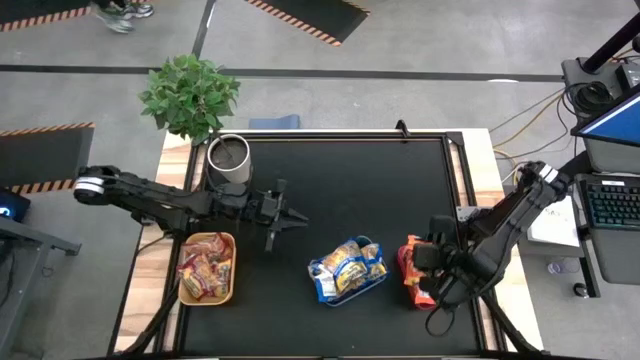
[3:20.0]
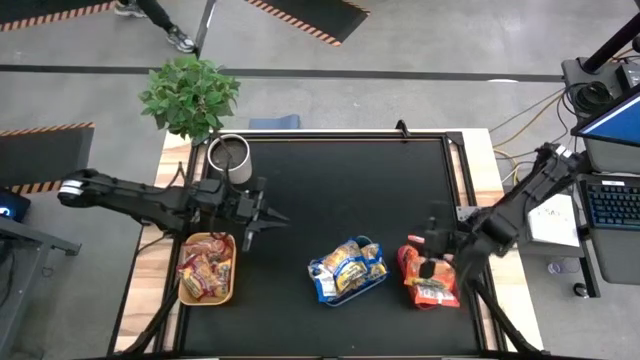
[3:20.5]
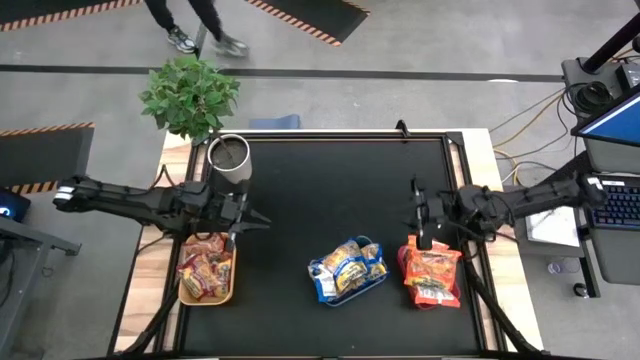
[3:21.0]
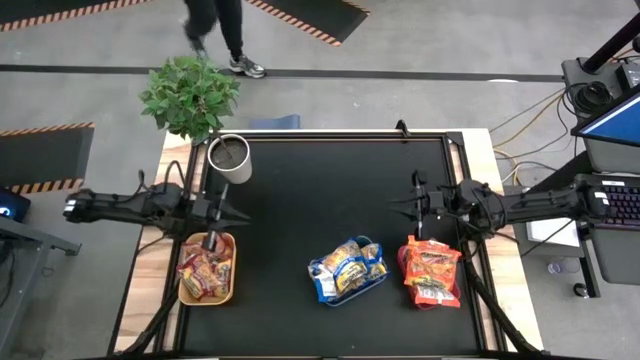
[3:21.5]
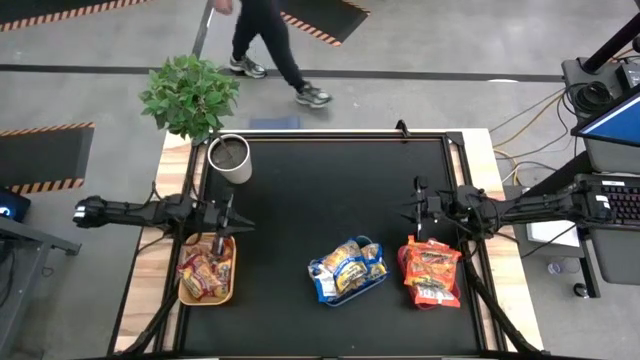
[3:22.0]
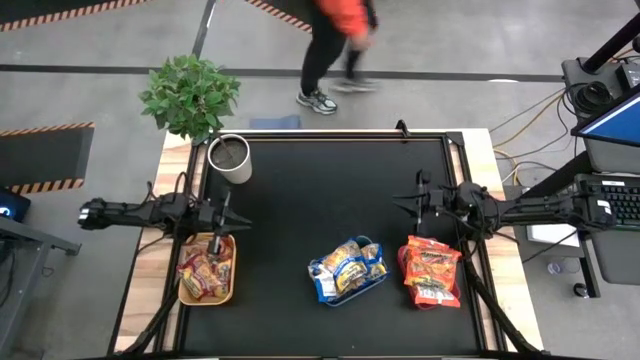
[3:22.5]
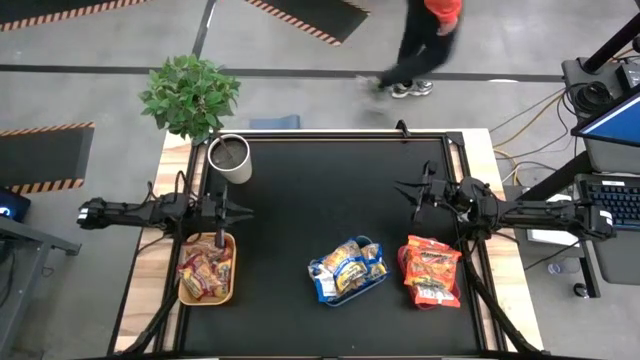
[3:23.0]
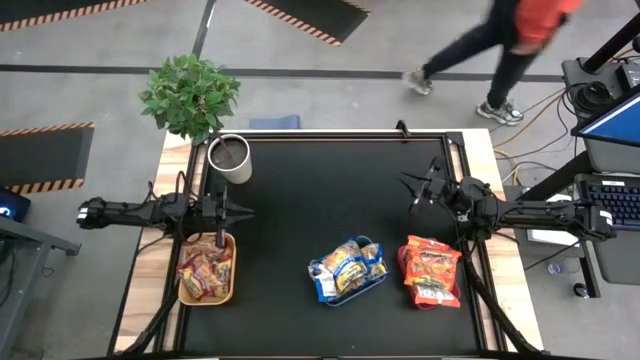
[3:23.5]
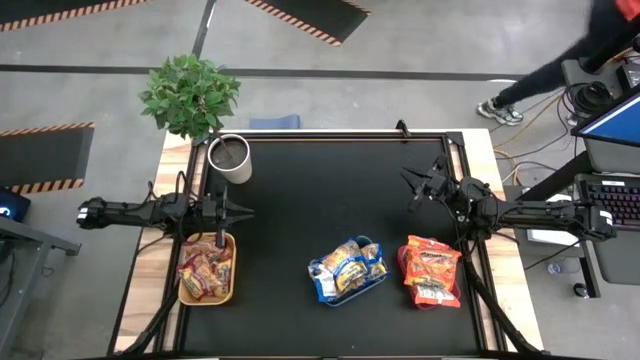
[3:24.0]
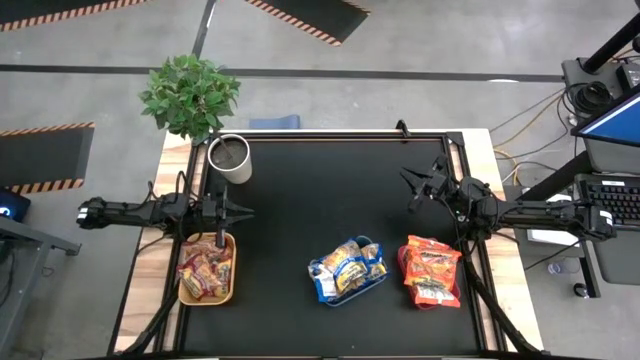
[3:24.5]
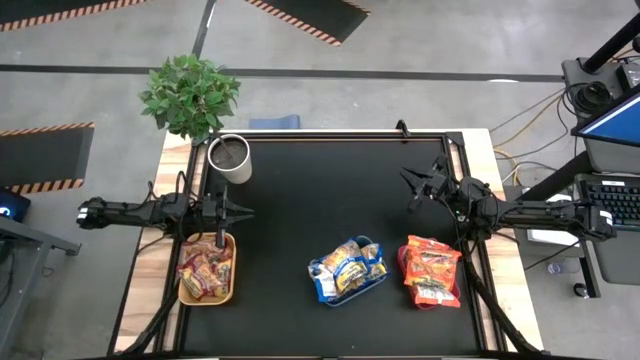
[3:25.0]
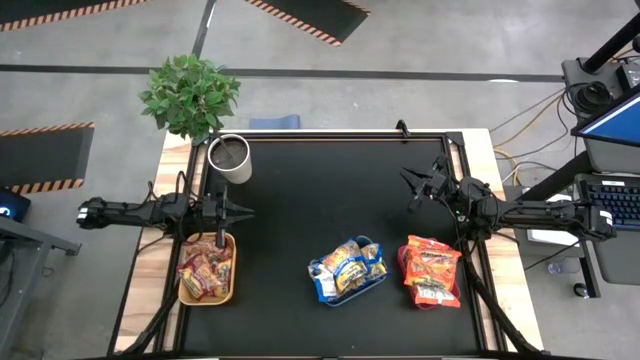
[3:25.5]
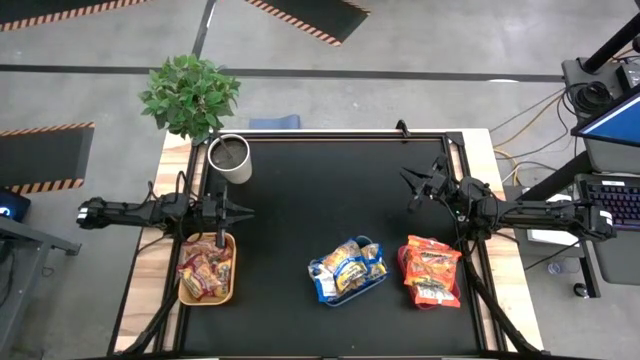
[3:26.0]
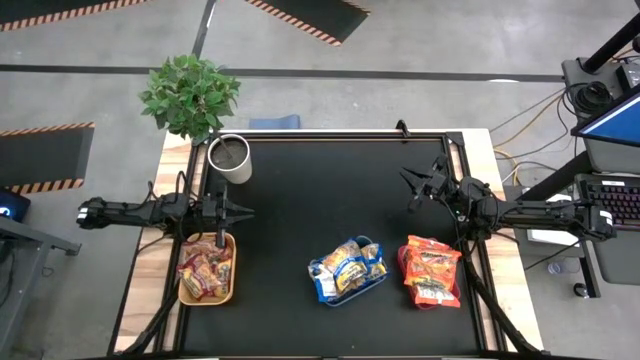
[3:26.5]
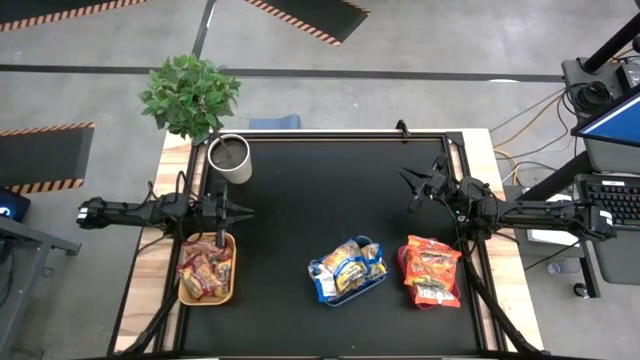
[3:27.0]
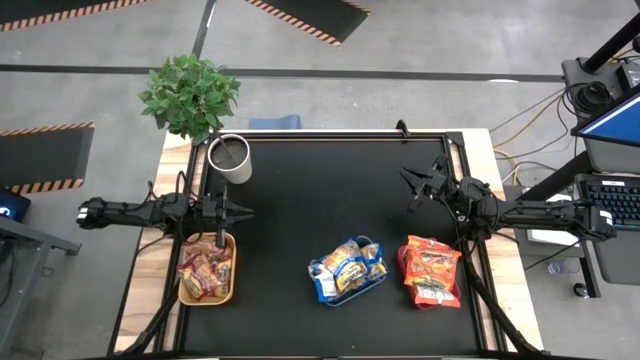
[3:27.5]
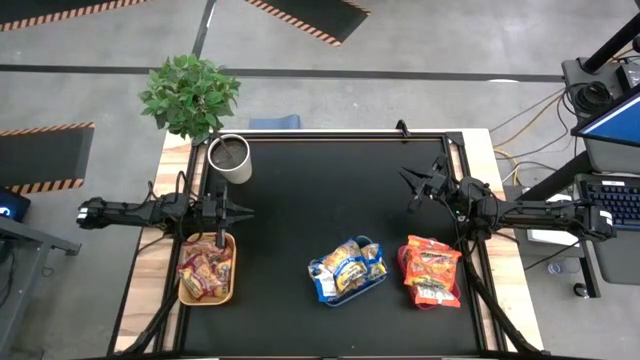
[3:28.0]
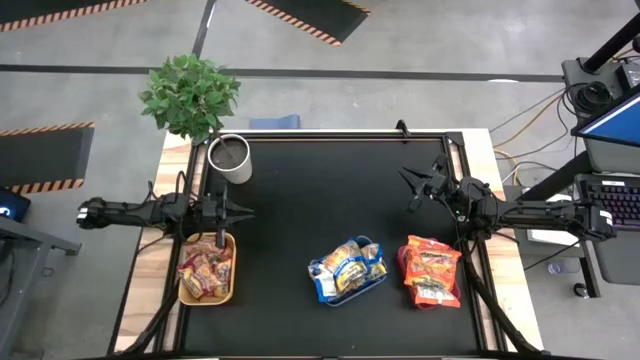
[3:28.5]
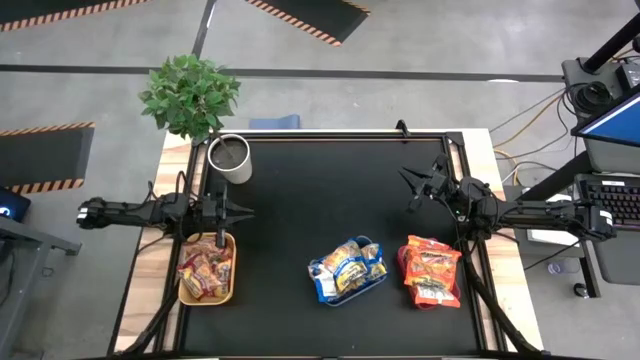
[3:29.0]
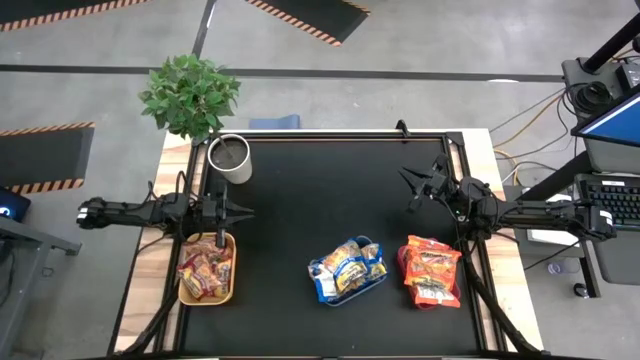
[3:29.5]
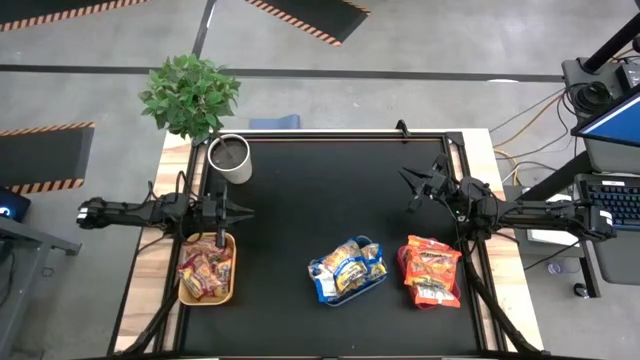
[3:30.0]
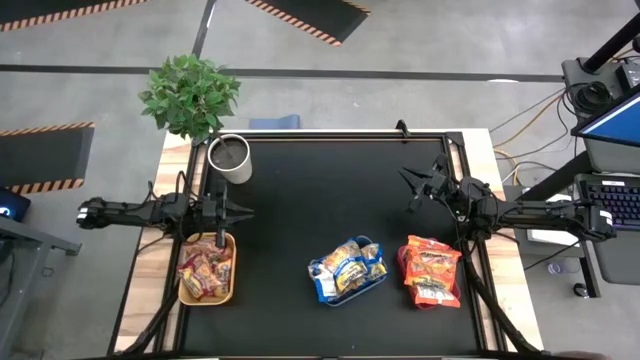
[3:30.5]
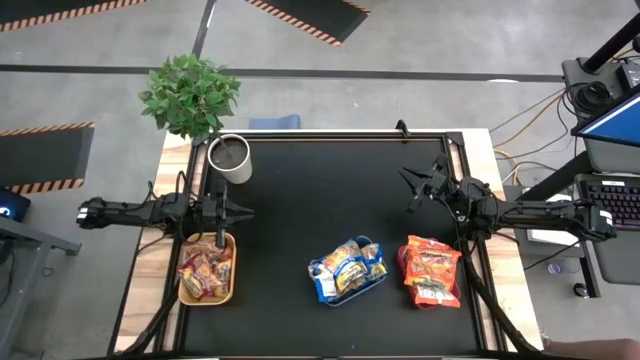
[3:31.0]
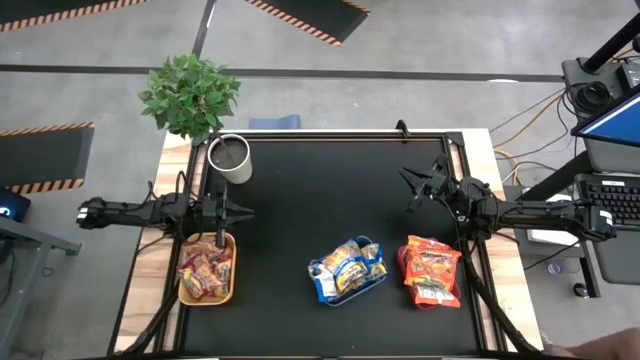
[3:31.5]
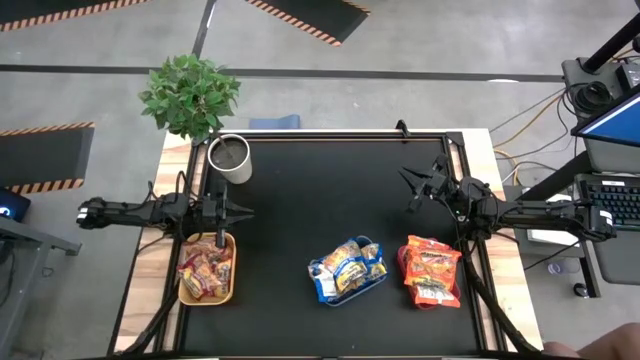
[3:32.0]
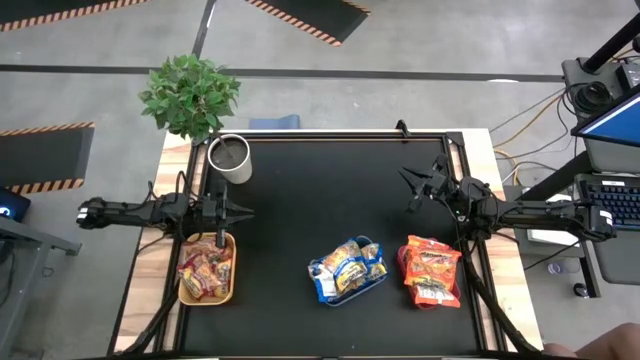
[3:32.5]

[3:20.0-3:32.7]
Task: Sort Maruchan noodles
Return to Home Position
